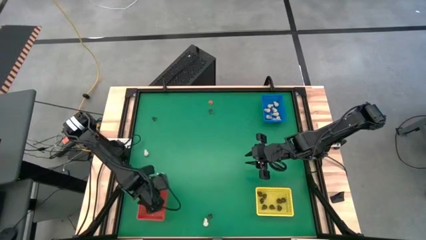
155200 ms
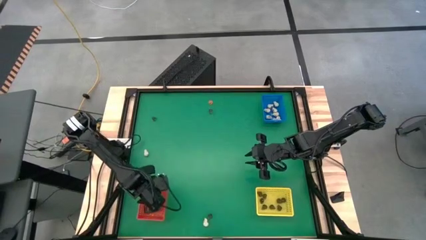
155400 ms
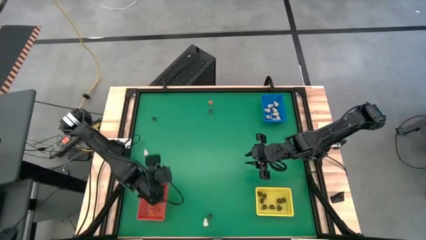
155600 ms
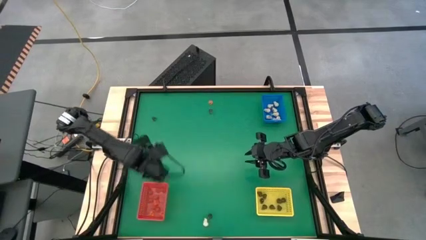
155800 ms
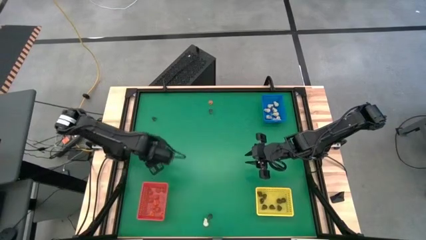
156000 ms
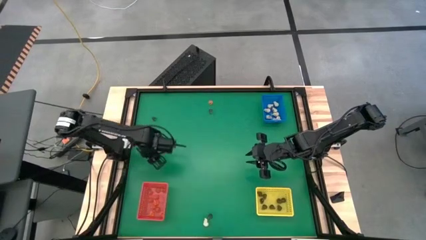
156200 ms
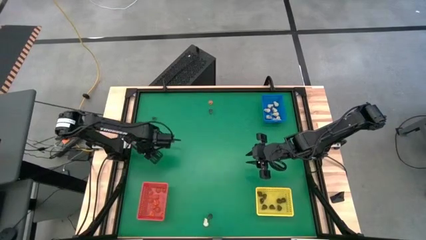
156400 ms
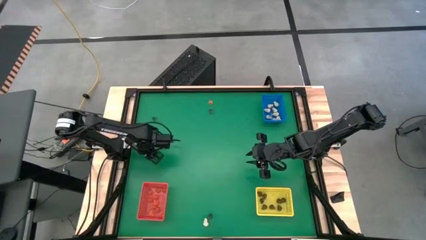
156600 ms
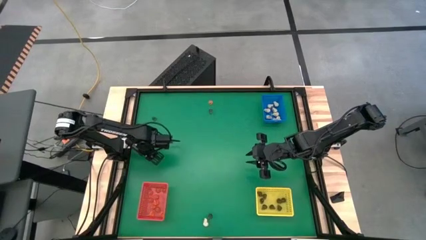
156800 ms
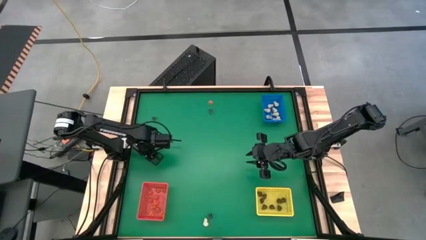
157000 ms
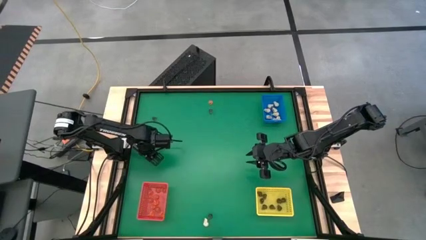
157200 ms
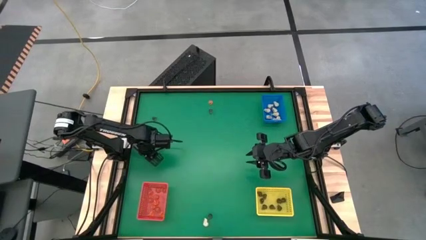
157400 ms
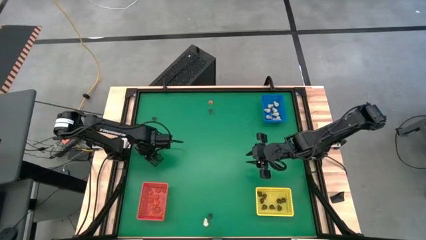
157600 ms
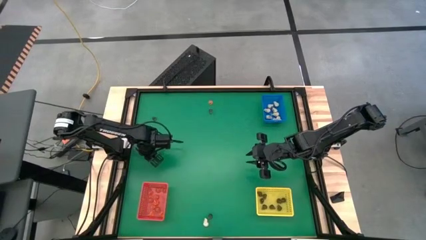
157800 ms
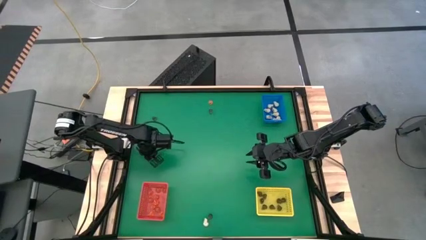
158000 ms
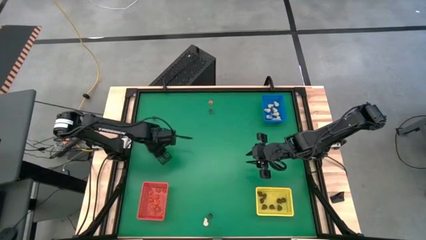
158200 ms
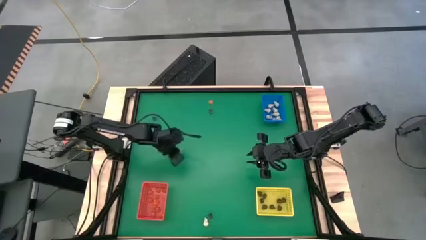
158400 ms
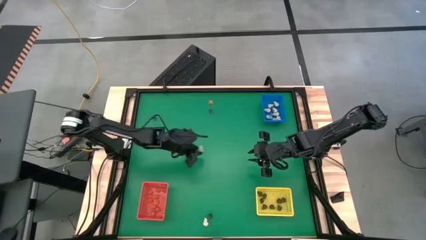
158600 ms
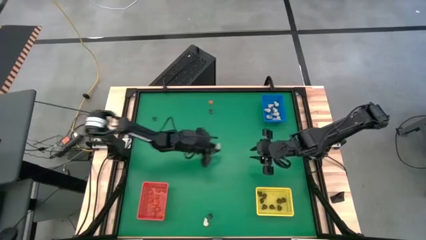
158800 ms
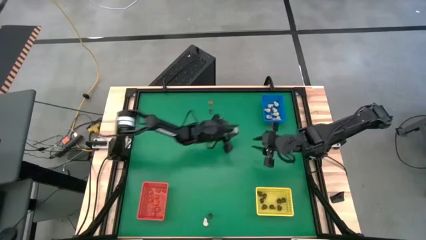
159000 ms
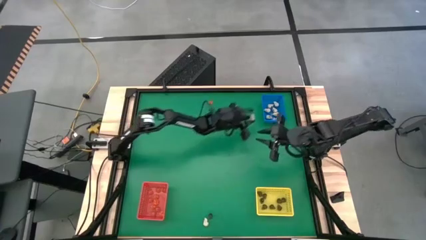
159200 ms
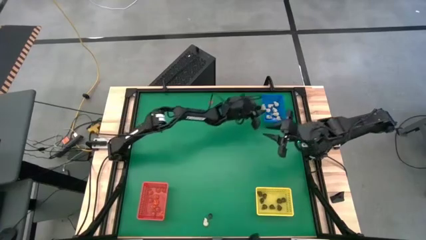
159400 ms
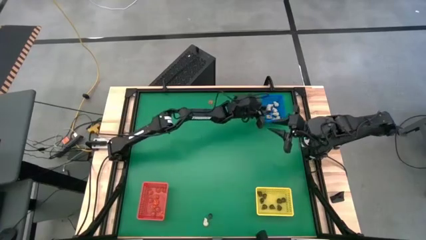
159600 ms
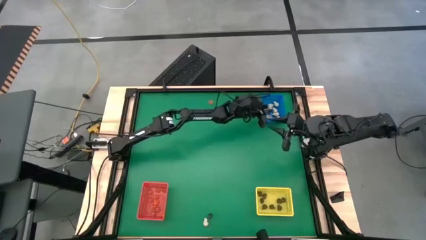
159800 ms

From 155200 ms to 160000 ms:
Task: Sort Halloween decoration
Put the white skull toy into the blue bin

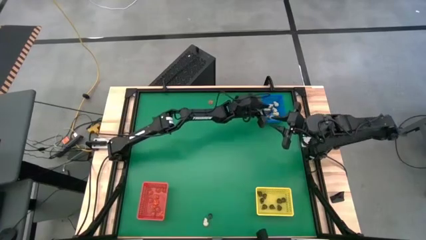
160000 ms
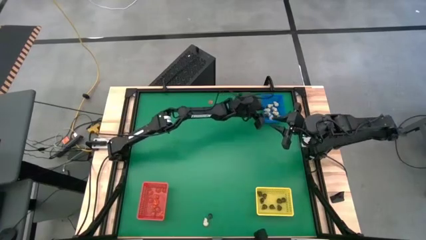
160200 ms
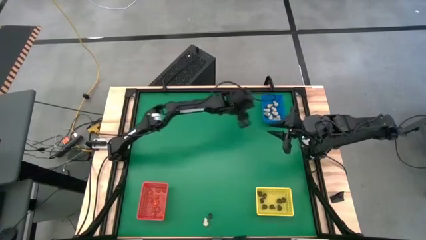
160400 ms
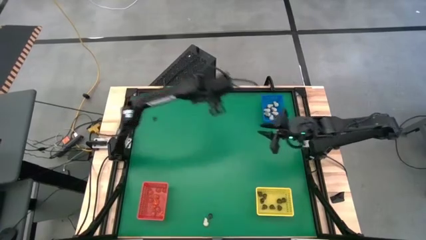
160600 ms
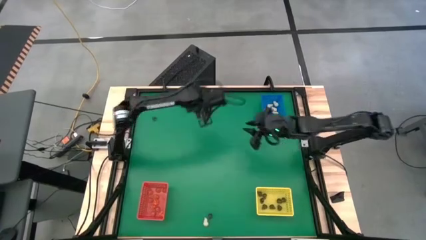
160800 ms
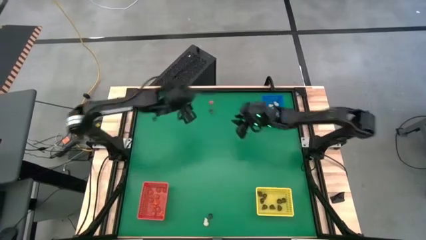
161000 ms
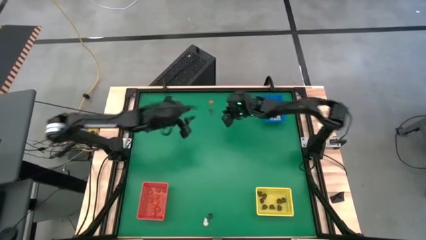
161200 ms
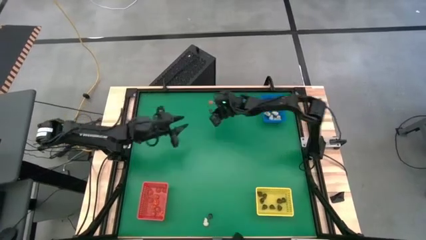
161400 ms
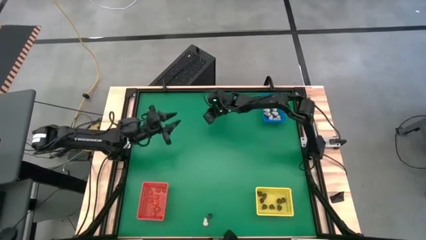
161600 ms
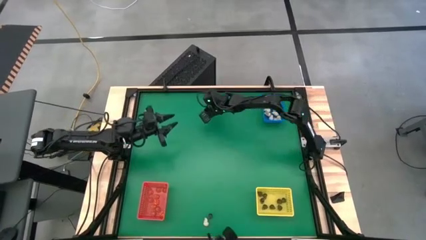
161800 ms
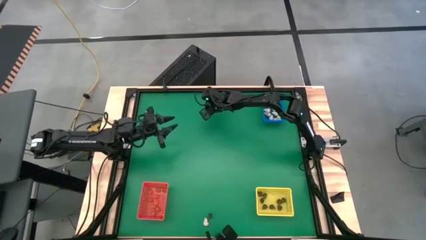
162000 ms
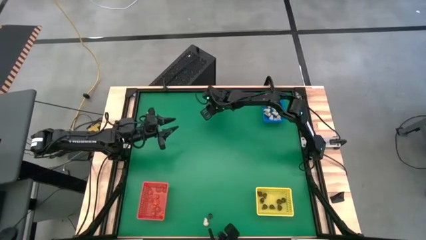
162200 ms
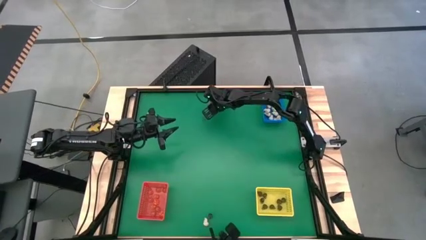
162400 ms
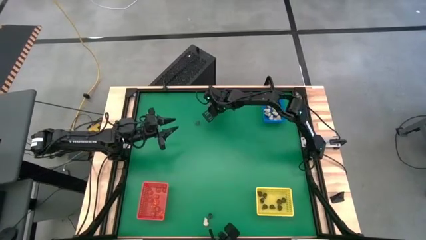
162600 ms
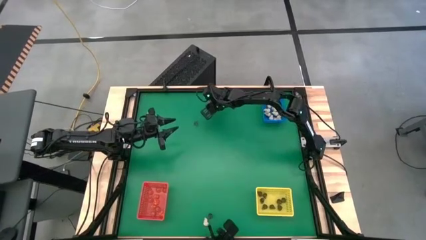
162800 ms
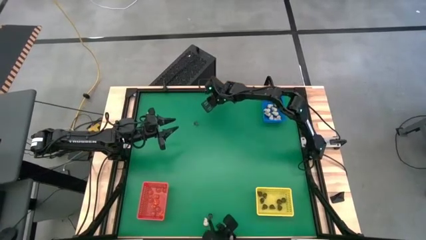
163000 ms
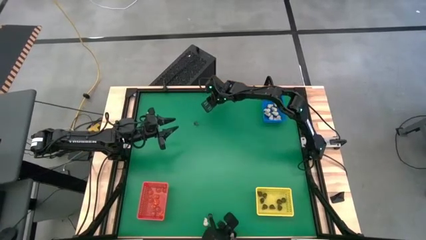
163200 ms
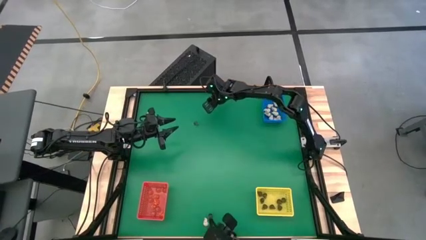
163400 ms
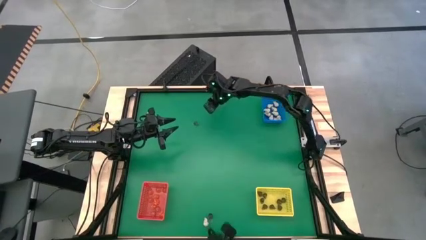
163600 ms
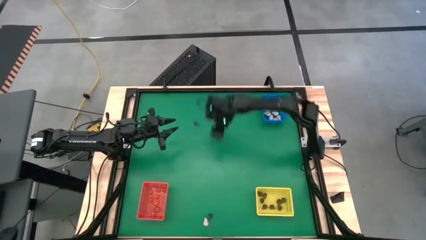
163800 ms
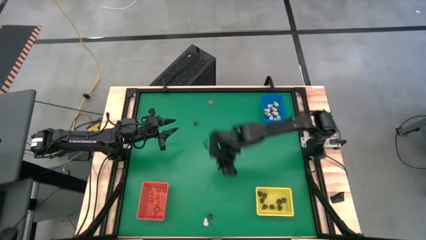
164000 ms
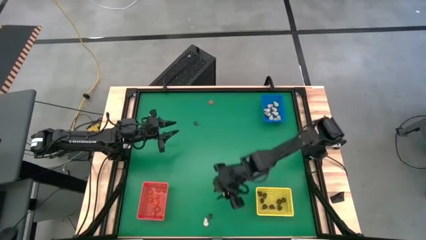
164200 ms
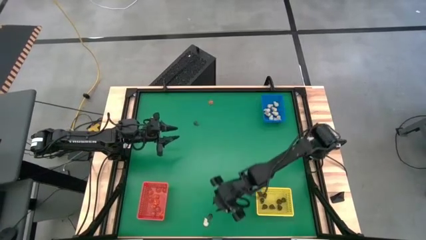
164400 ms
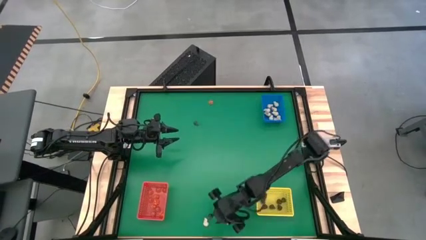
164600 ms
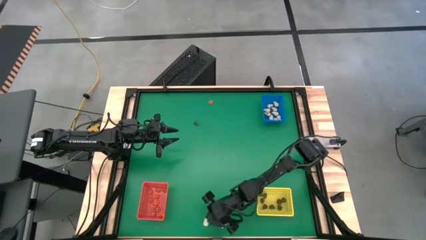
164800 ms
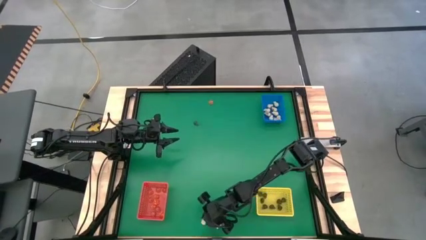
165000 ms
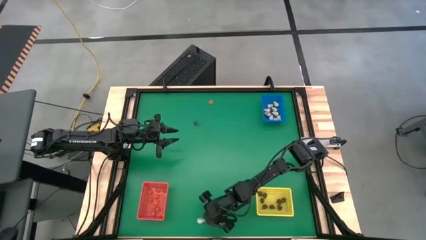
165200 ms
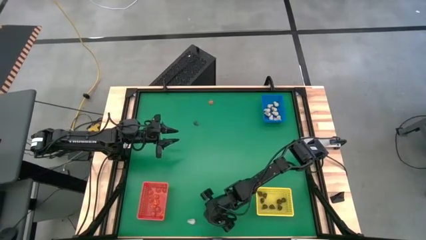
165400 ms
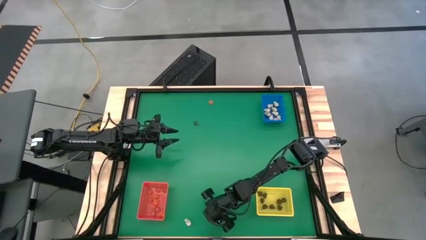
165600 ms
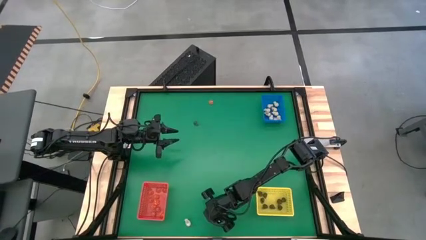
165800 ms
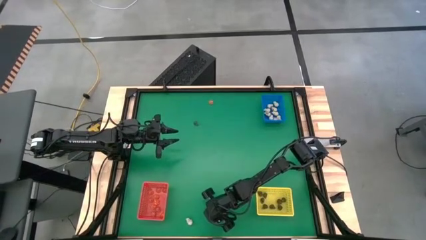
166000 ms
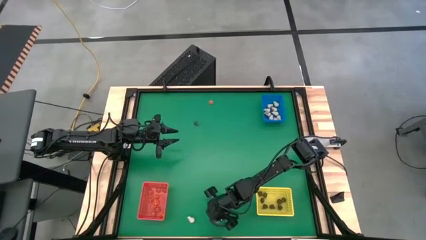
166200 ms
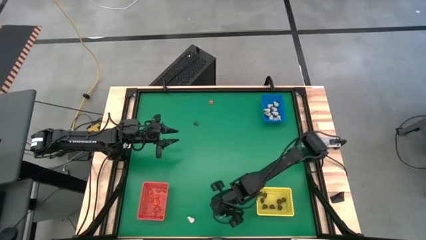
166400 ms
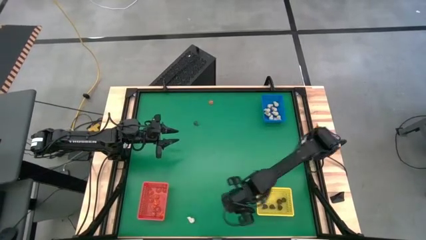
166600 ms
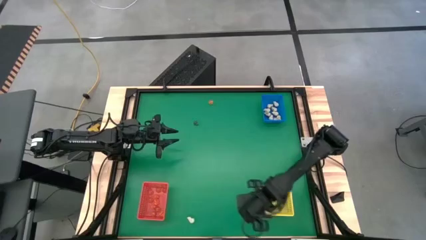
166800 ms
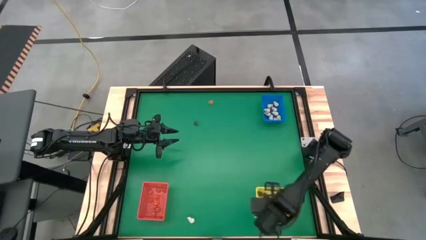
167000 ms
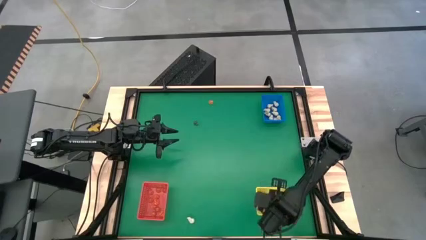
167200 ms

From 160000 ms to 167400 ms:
Put the black skull toy into the yellow bin

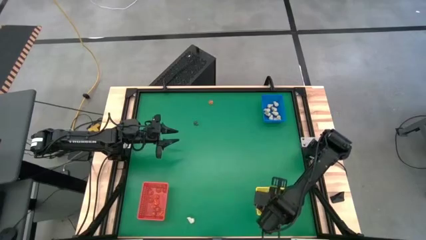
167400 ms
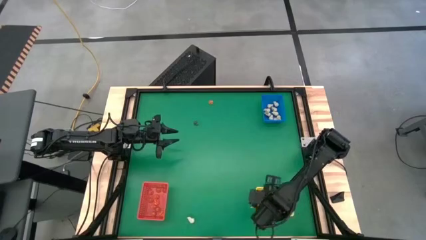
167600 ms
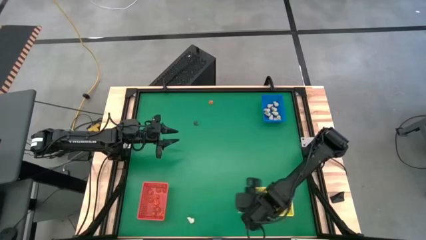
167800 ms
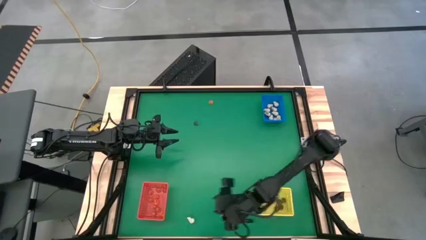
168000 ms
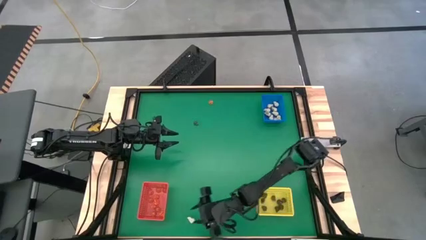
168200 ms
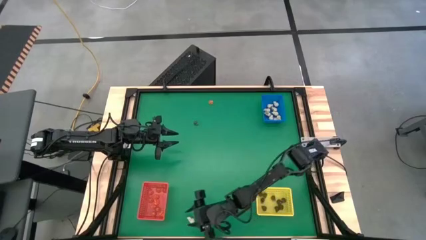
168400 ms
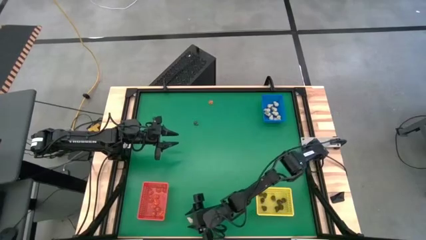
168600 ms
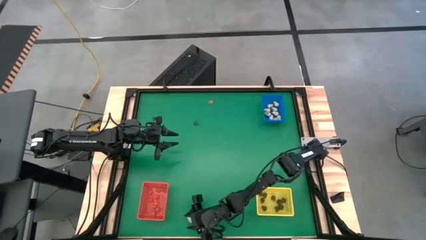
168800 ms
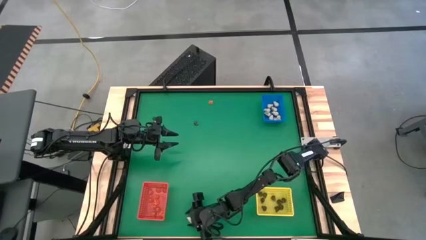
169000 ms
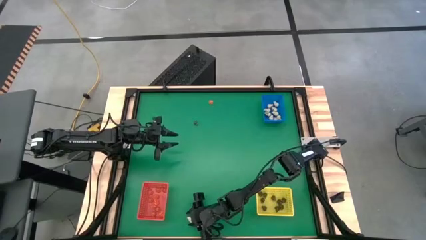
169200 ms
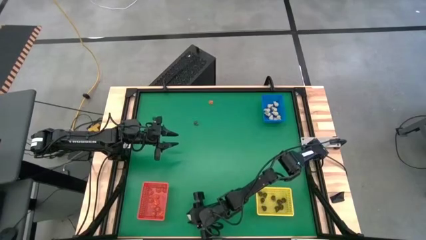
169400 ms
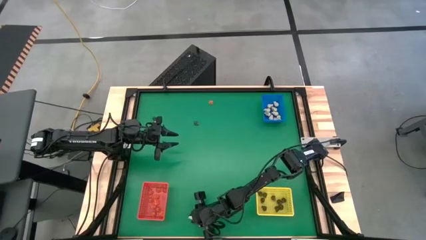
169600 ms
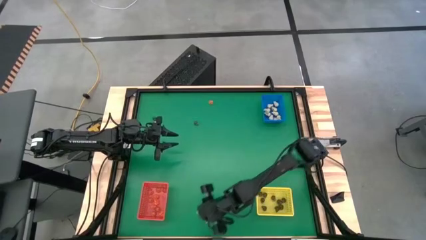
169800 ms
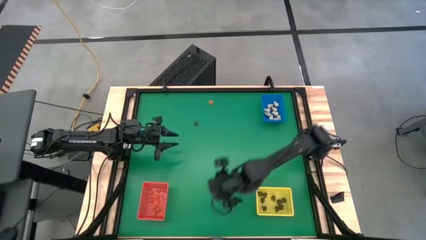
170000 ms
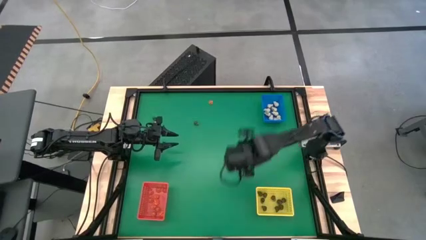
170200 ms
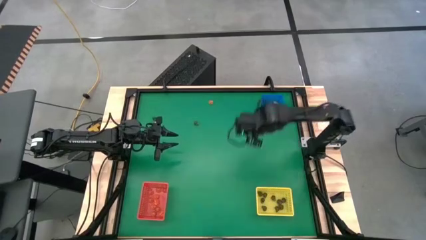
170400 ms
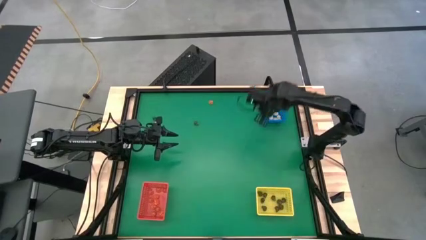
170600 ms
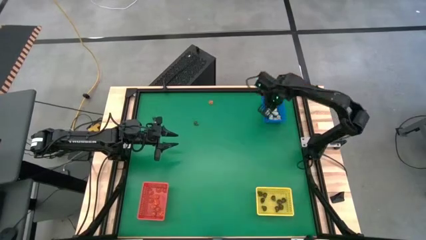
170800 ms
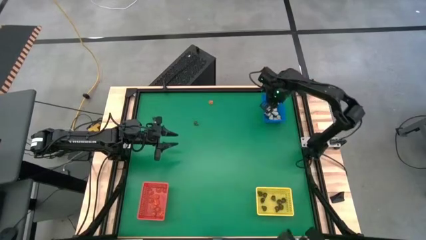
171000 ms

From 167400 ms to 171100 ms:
Put the white skull toy into the blue bin

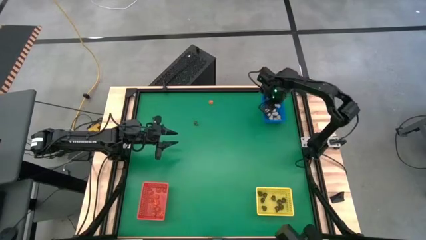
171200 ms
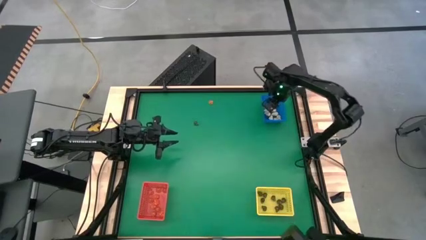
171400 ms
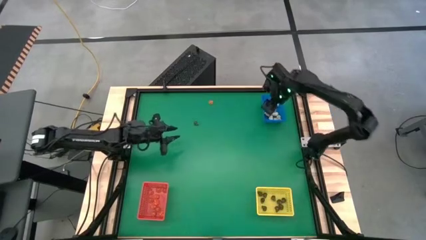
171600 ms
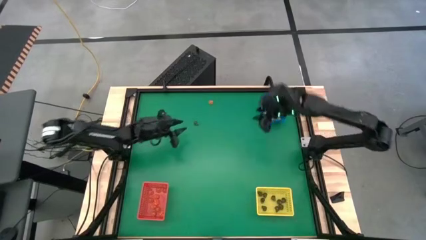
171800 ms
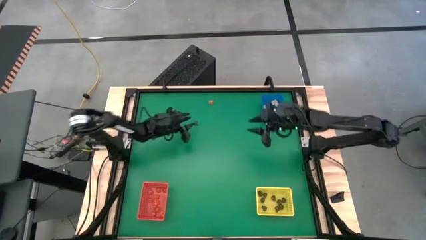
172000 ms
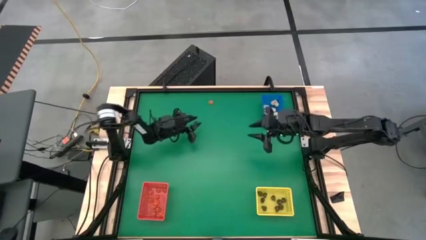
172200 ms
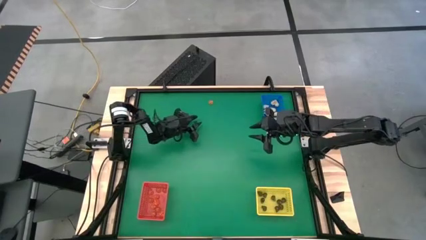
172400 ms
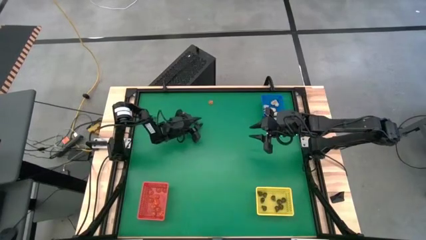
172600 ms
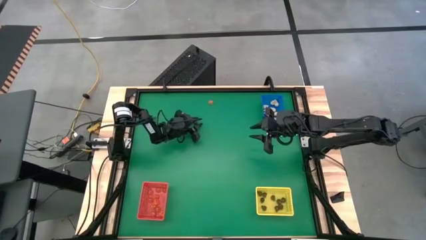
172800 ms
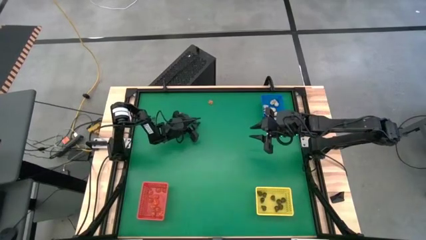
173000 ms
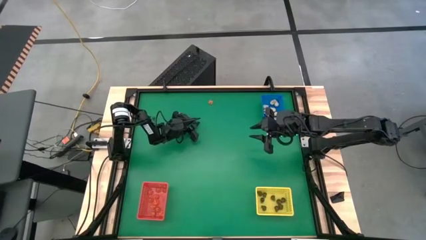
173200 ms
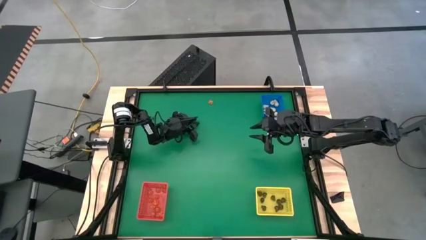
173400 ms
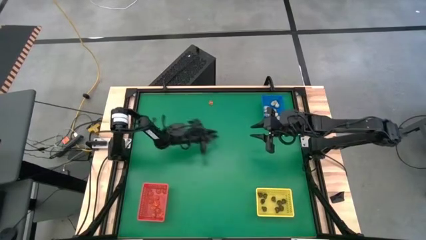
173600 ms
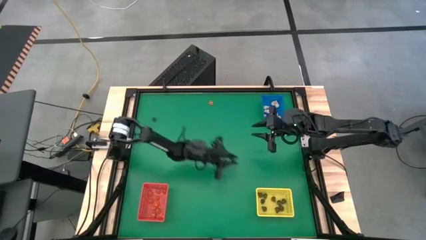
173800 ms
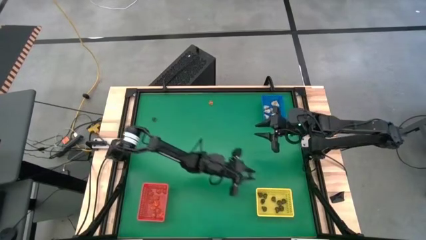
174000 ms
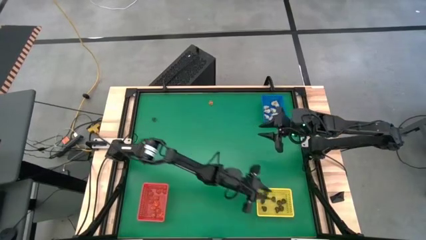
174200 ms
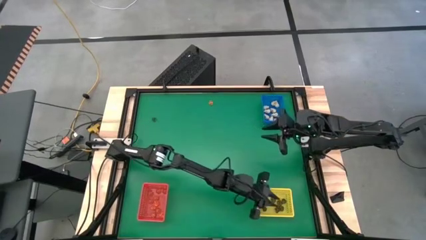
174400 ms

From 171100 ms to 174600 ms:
Put the black skull toy into the yellow bin
